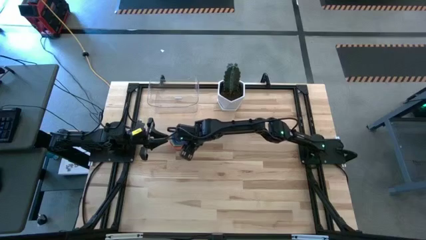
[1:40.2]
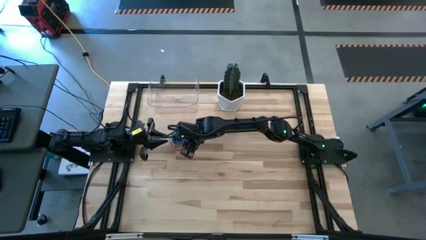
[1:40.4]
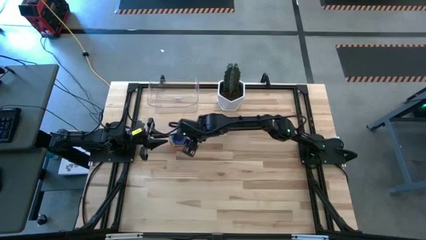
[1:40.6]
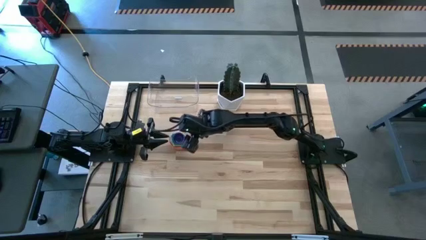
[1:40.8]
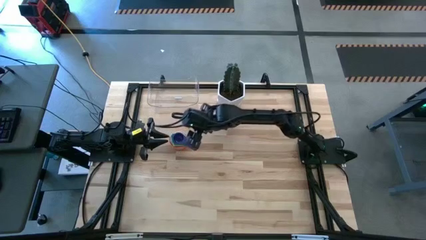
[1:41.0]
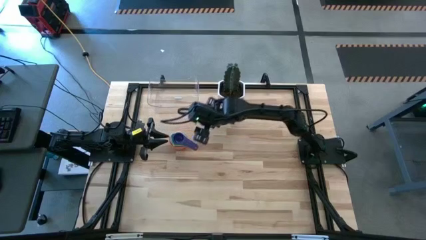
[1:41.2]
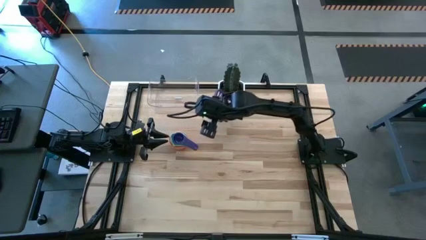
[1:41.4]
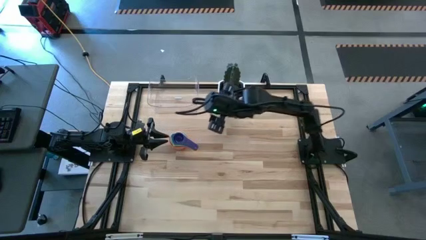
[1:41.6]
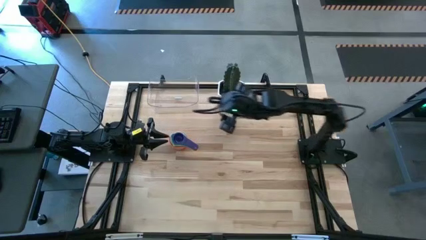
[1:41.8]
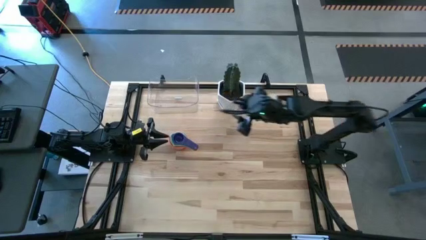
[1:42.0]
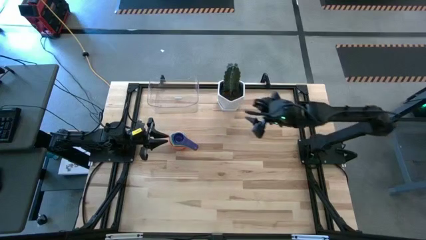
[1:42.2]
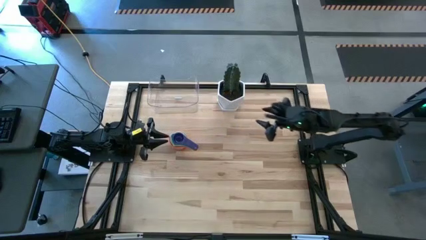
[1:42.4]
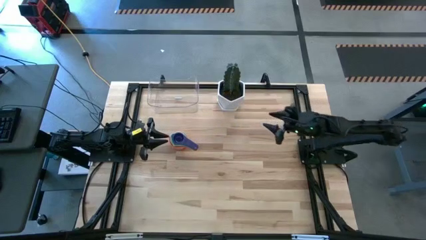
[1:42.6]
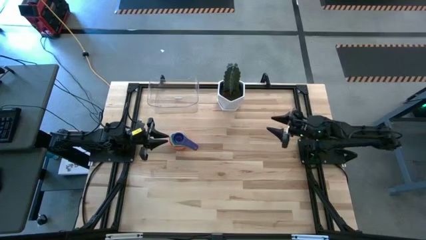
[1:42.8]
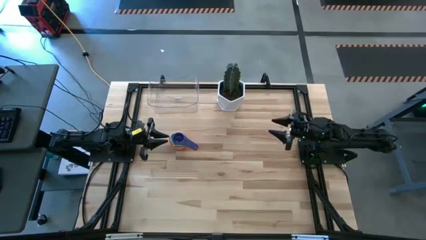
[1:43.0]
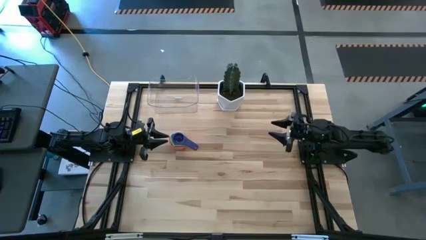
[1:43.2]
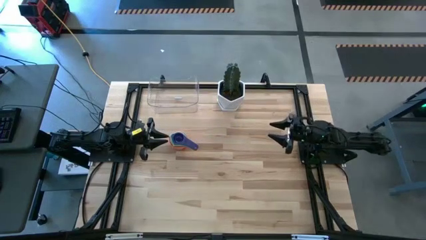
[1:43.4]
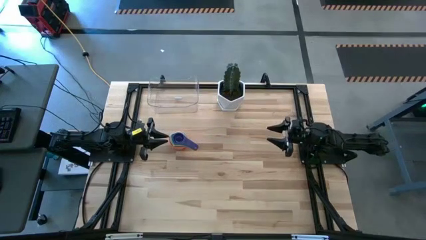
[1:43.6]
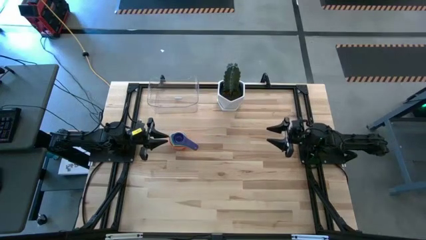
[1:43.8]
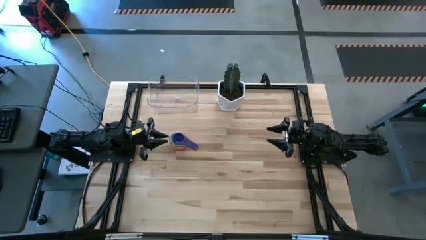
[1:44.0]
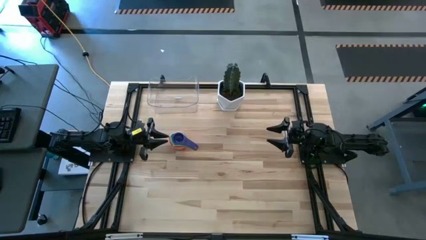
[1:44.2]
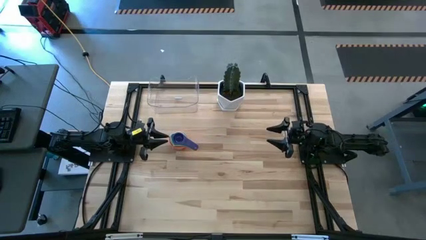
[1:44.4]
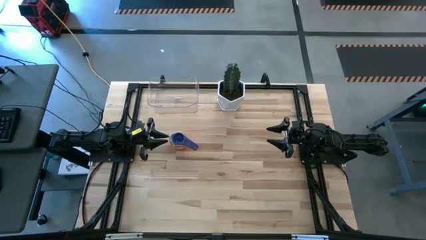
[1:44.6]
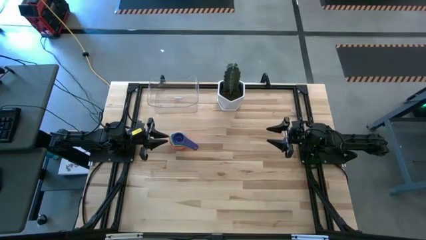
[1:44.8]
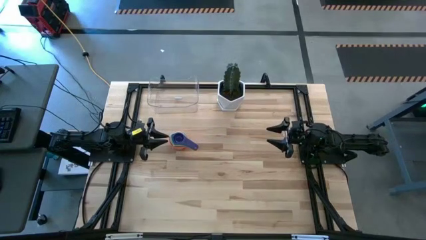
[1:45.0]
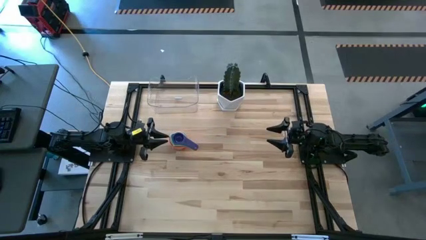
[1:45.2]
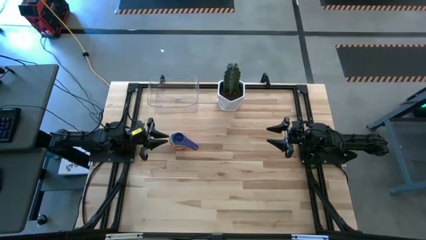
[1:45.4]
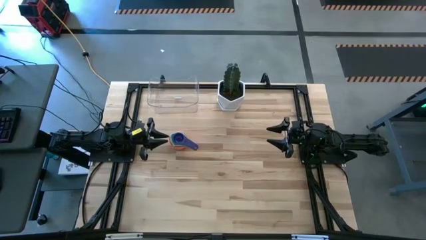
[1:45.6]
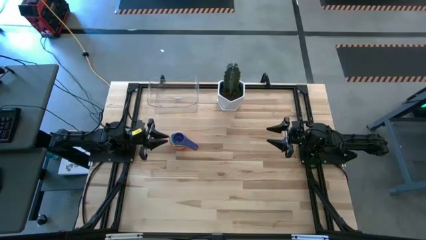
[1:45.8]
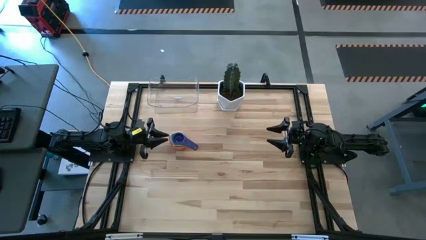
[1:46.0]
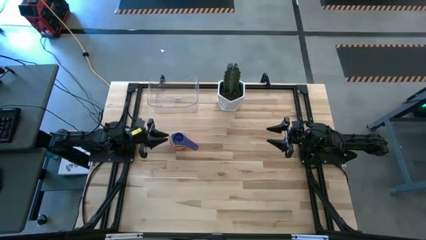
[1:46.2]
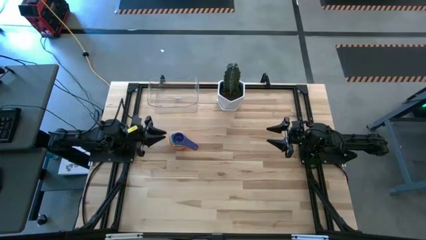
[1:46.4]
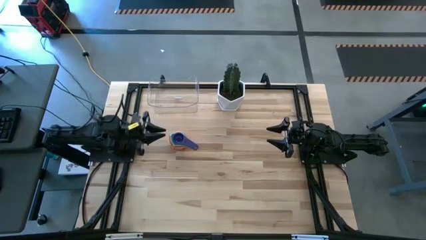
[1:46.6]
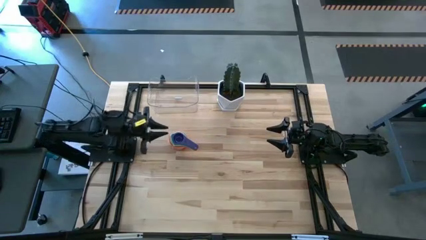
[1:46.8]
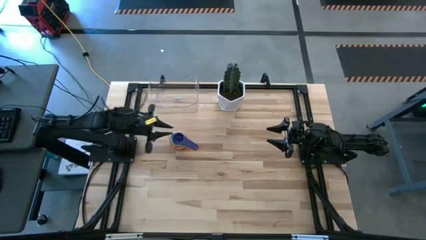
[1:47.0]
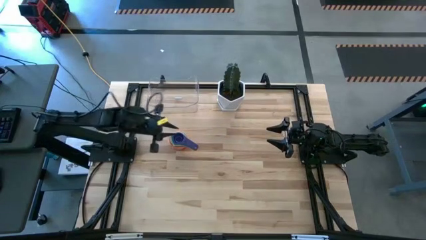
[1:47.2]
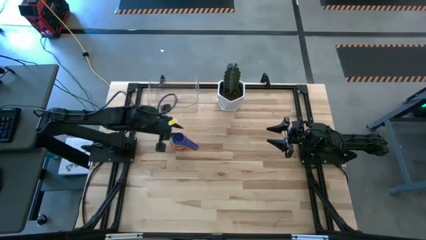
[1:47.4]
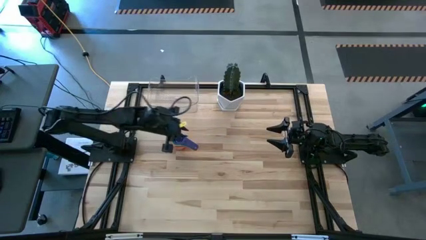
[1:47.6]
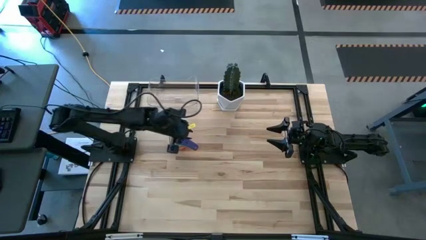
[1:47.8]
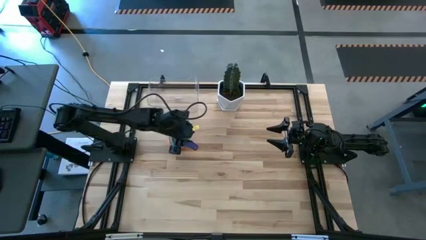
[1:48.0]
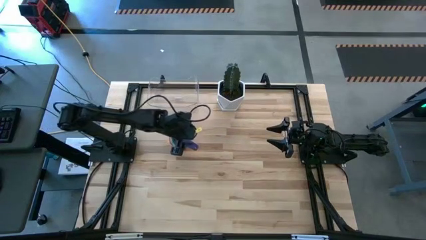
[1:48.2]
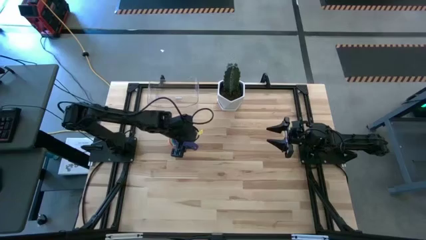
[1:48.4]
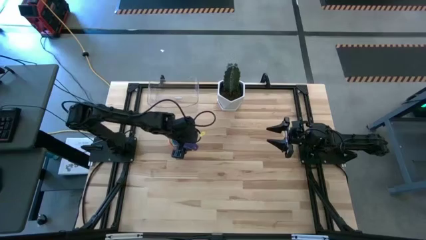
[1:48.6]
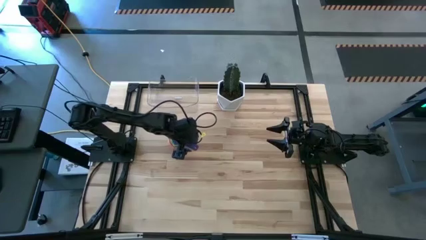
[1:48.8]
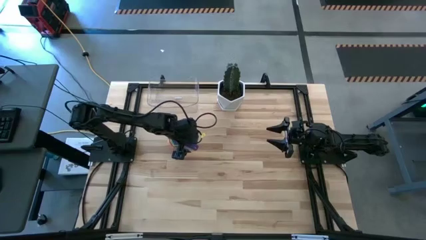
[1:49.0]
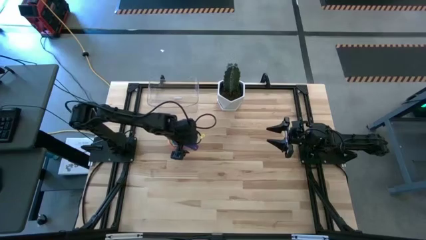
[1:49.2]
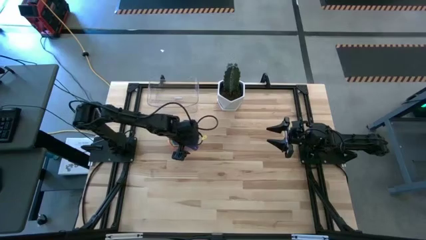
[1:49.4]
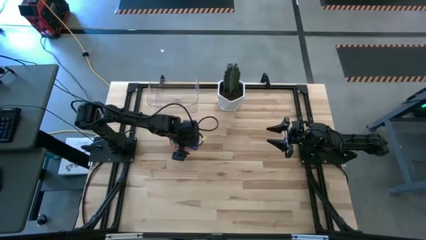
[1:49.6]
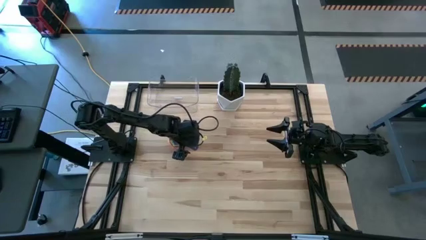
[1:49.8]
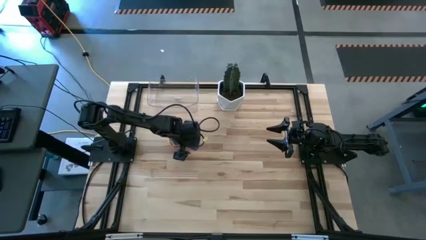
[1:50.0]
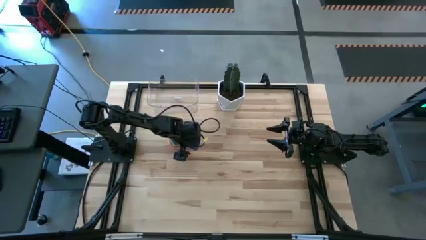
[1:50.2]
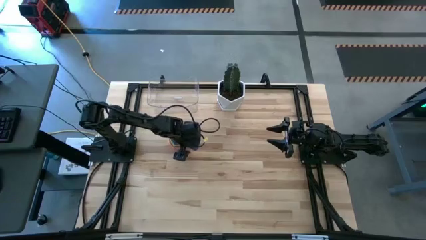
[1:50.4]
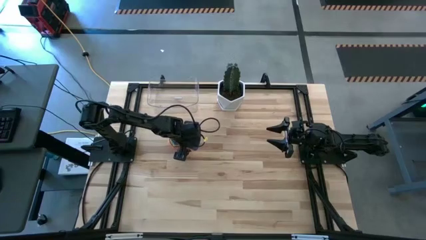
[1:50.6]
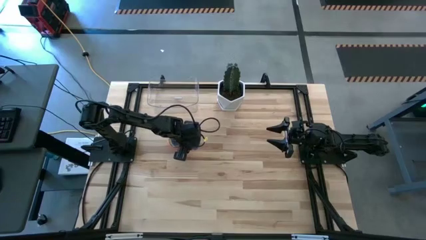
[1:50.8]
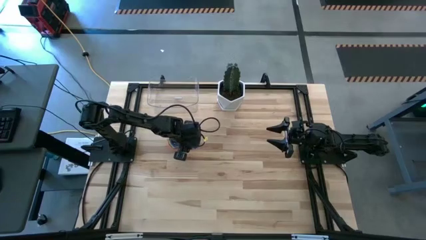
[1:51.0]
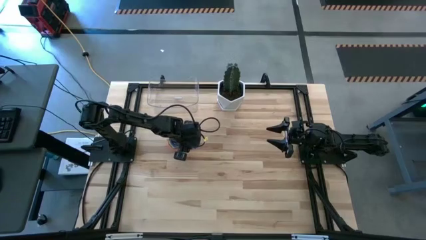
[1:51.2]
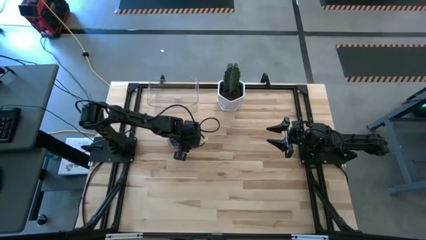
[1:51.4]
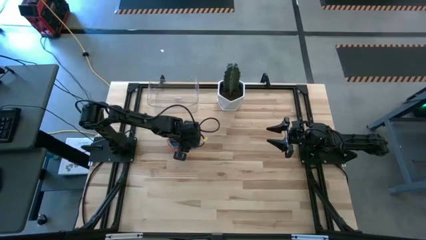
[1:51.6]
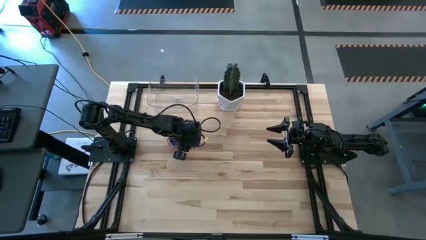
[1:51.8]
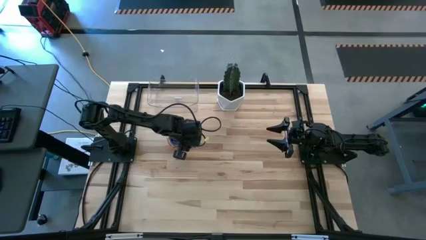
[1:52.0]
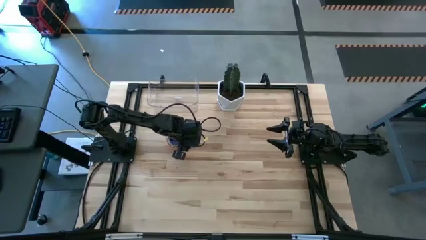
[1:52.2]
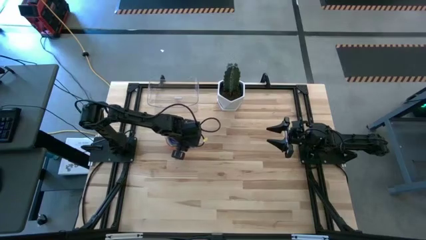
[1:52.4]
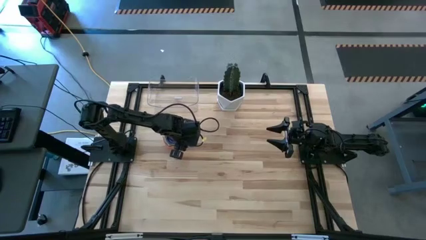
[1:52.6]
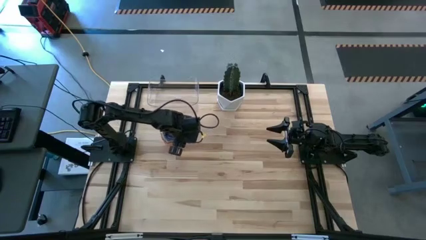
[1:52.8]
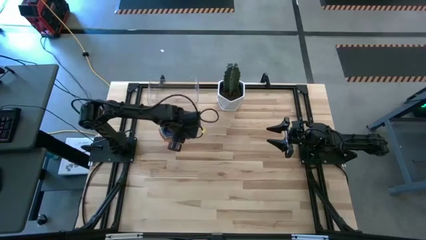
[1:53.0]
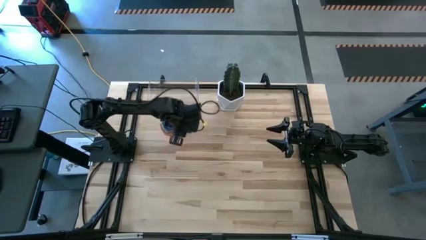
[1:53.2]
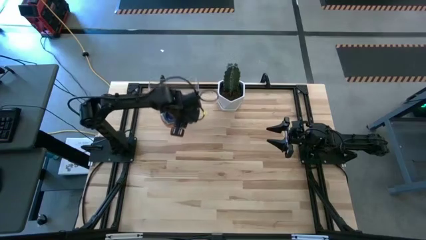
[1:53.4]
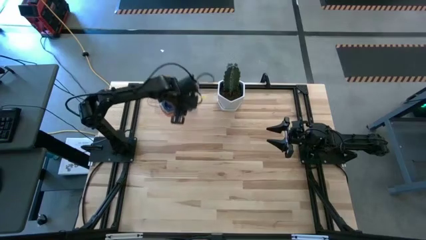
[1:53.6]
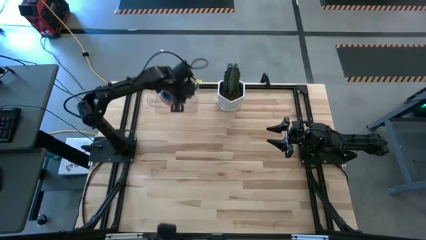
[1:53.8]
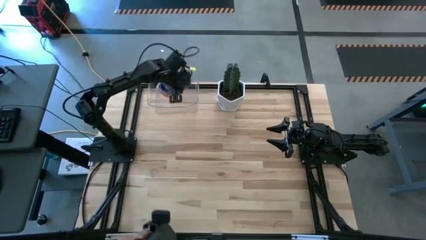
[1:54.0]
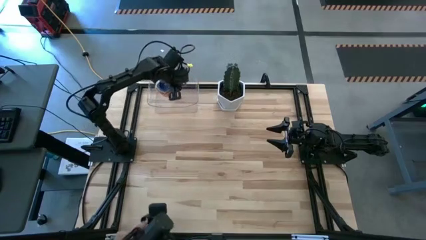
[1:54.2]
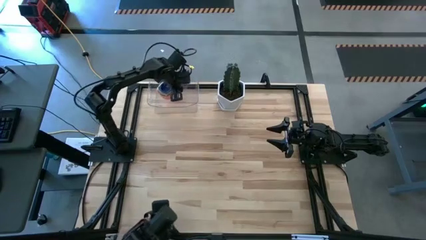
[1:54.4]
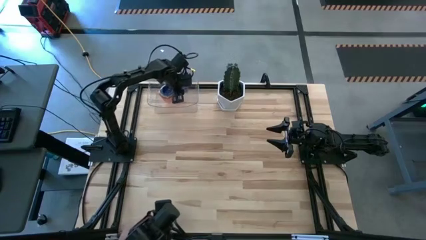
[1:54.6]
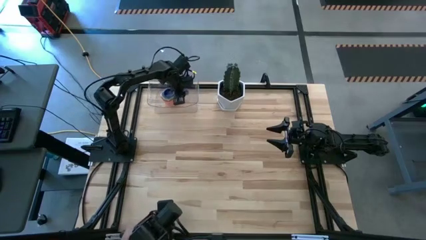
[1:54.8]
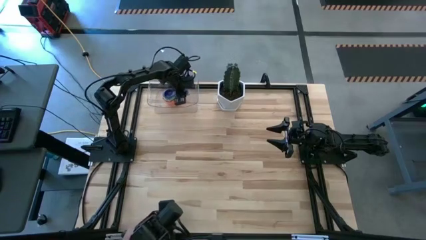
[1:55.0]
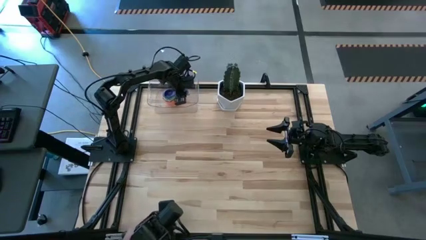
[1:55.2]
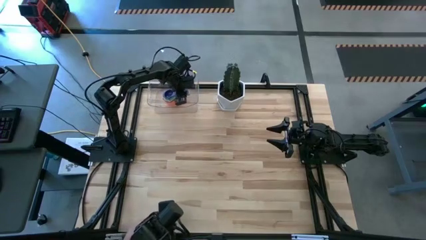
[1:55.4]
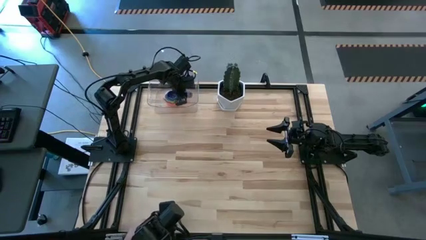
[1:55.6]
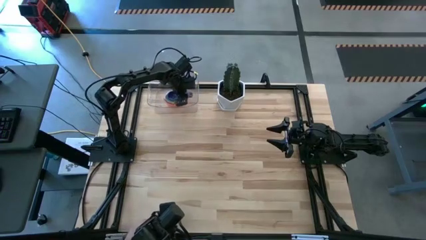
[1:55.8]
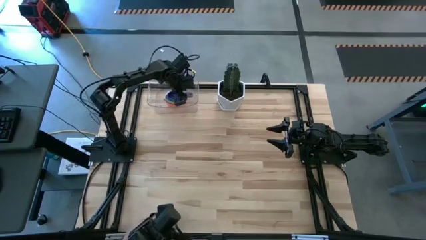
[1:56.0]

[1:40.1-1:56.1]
Task: Nest measuring cups in basket
Put the stacked measuring cups into the bin

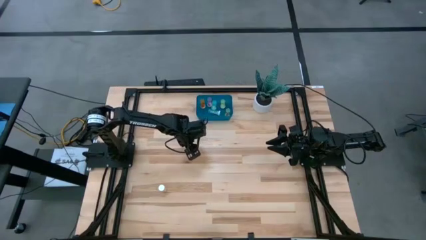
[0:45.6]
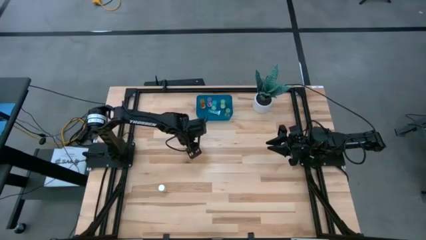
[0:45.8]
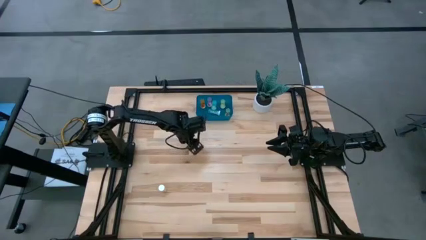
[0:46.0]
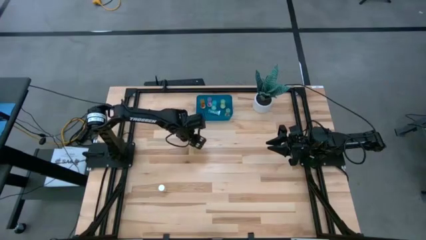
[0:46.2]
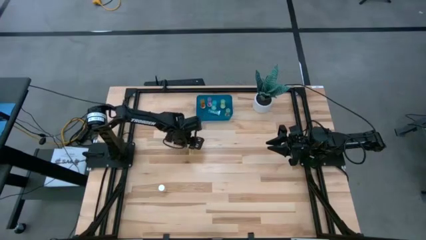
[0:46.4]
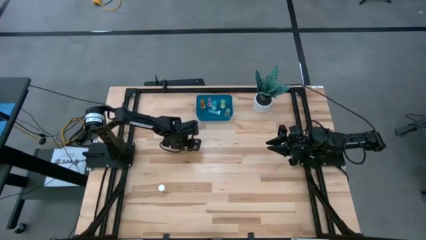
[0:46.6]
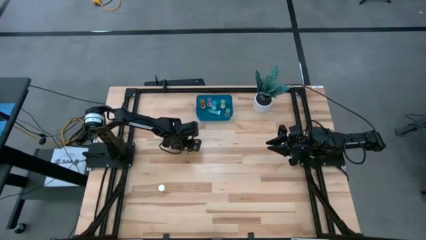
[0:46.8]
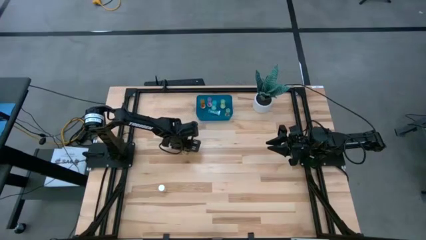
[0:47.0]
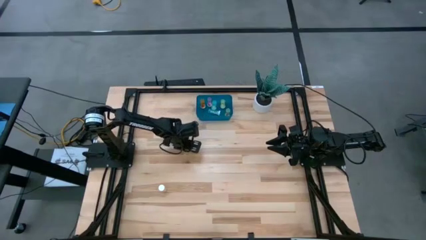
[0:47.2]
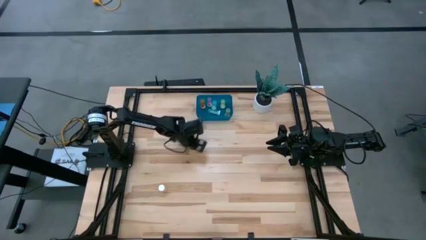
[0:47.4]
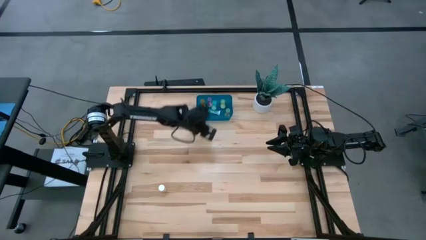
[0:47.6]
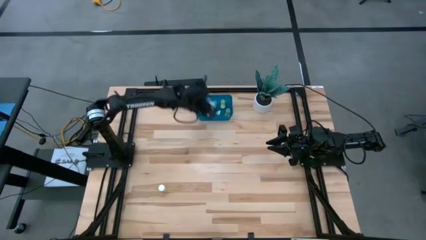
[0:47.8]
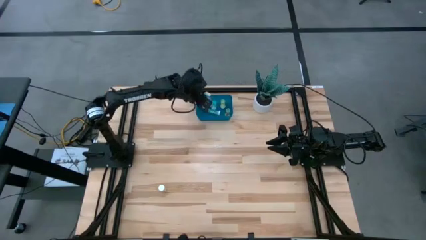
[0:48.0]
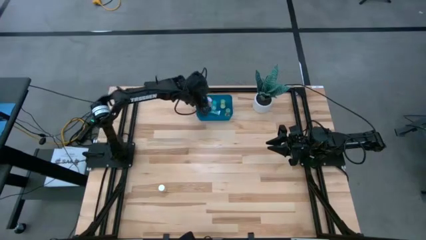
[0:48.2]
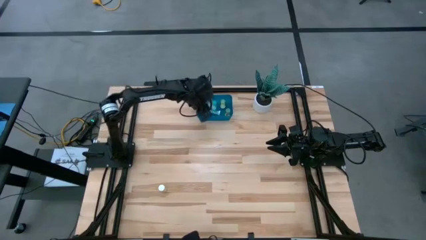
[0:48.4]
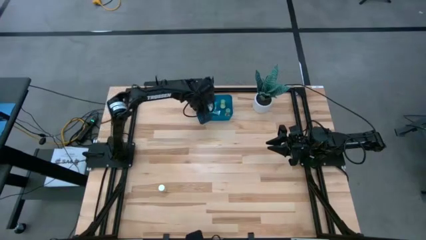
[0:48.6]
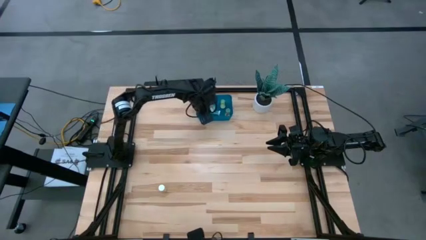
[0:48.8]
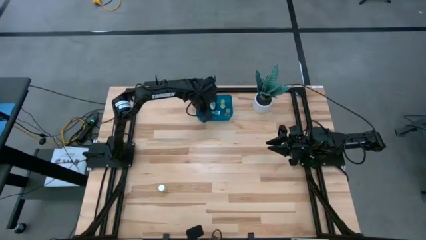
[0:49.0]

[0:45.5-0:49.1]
Task: Pick and place pill bottles into a basket
Put the yellow pill bottle into the blue bin
